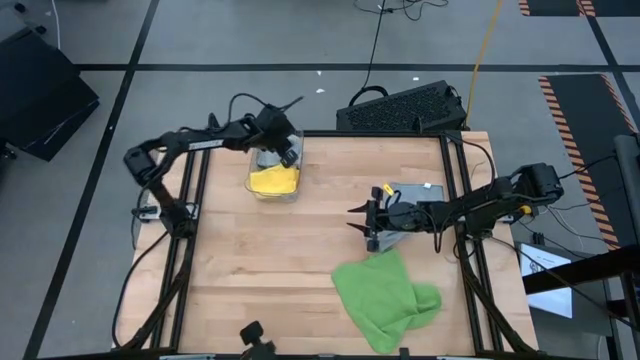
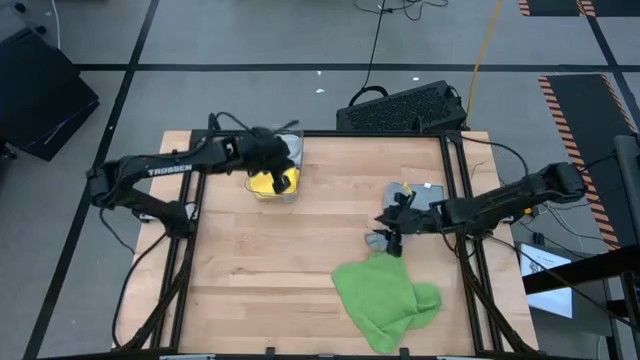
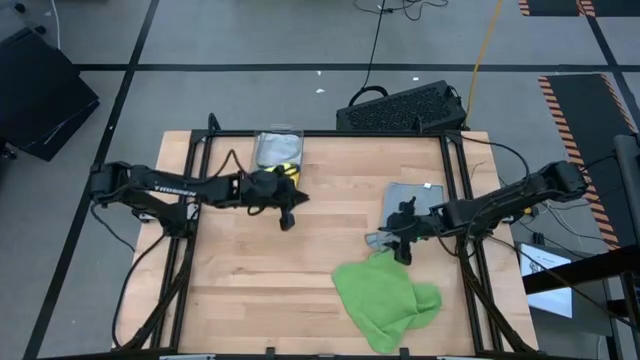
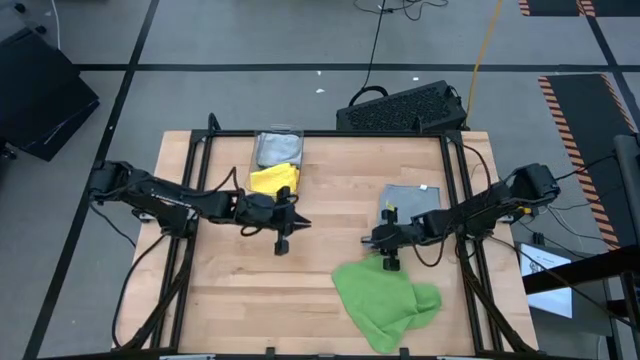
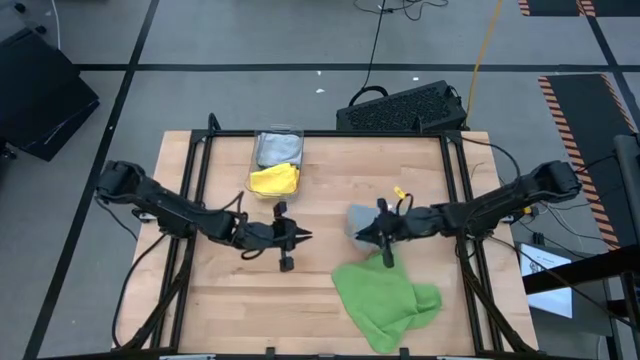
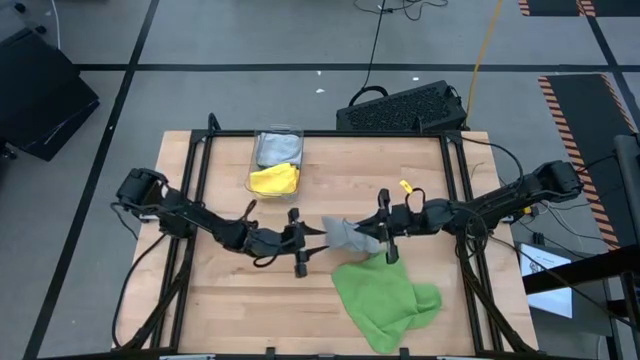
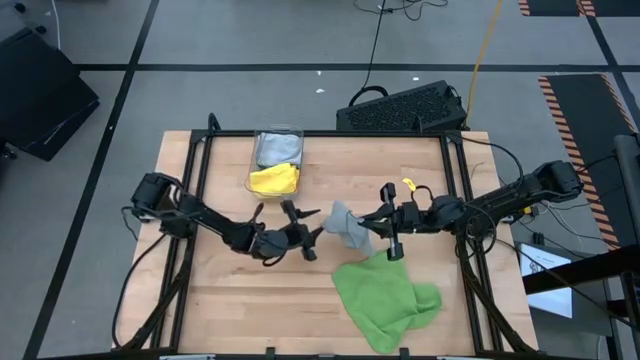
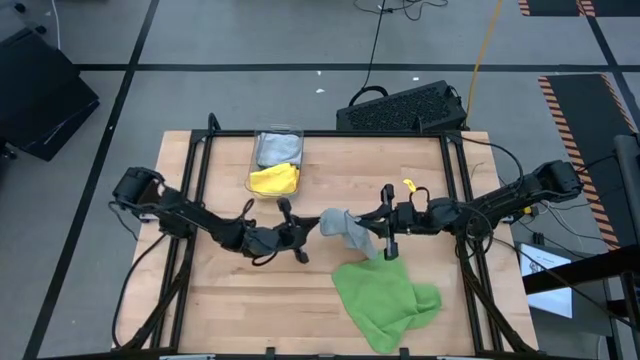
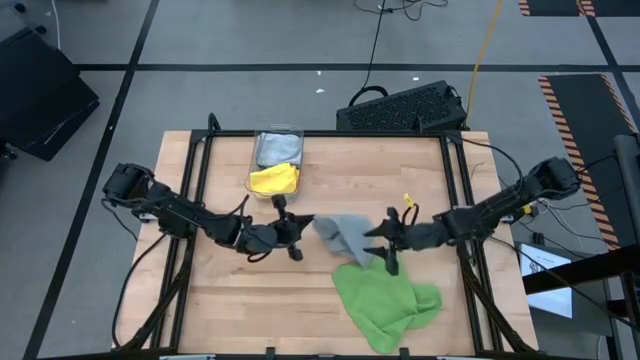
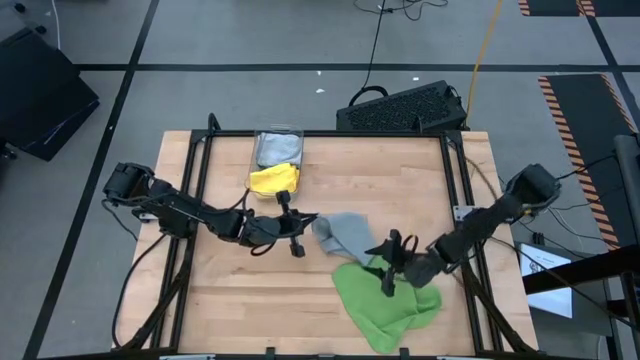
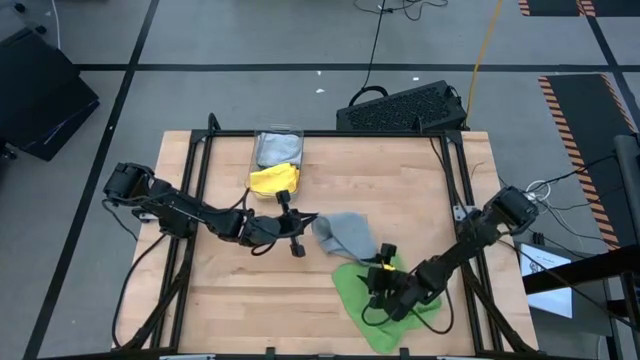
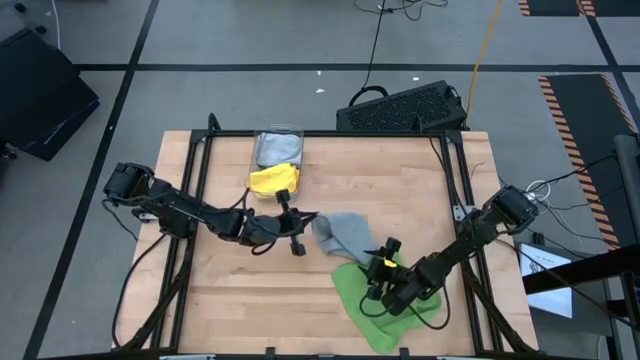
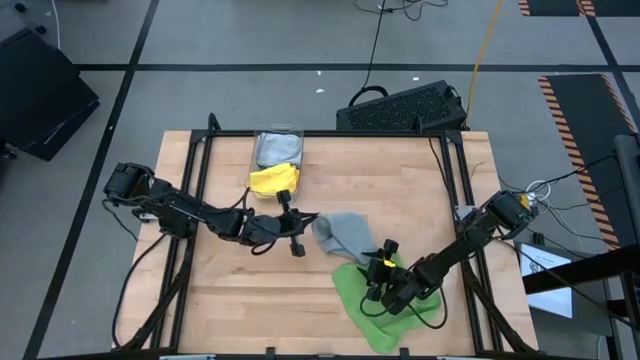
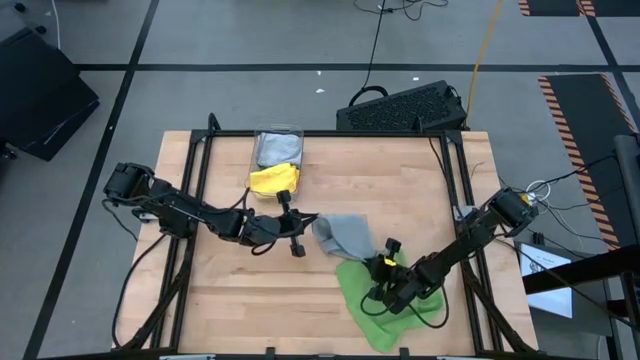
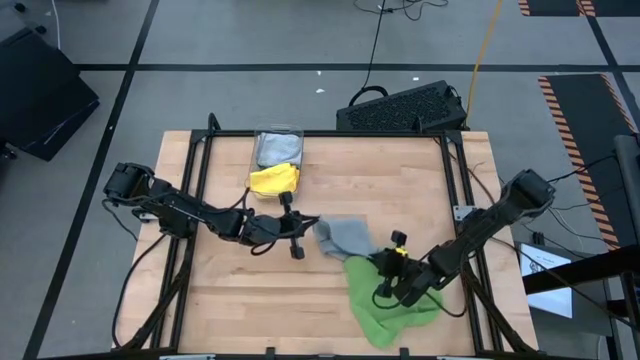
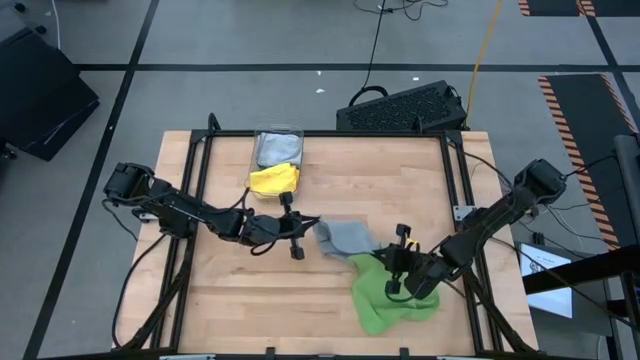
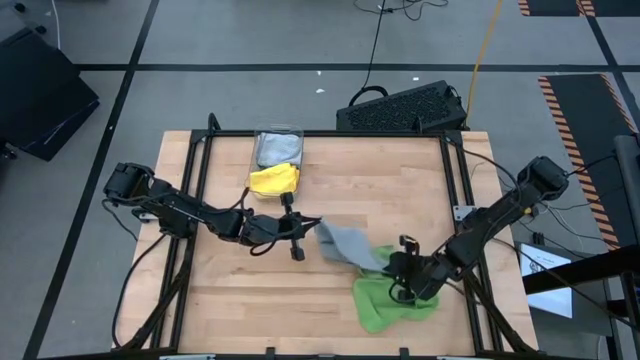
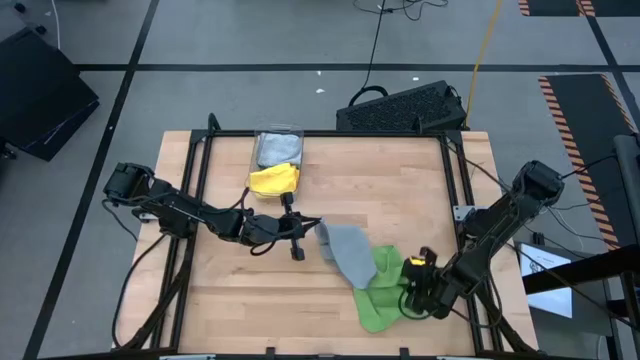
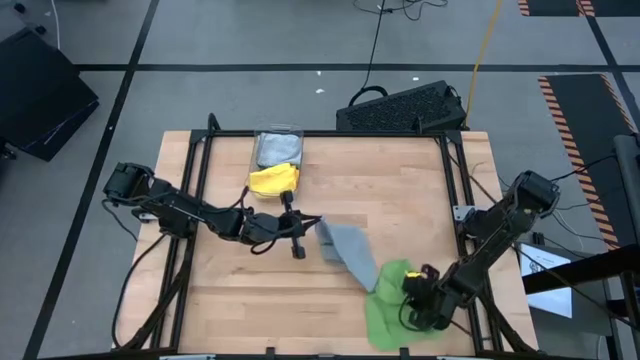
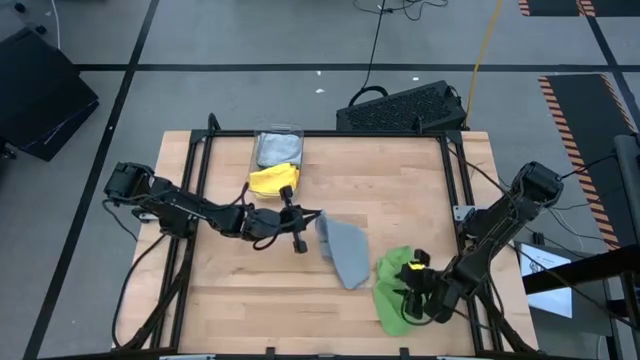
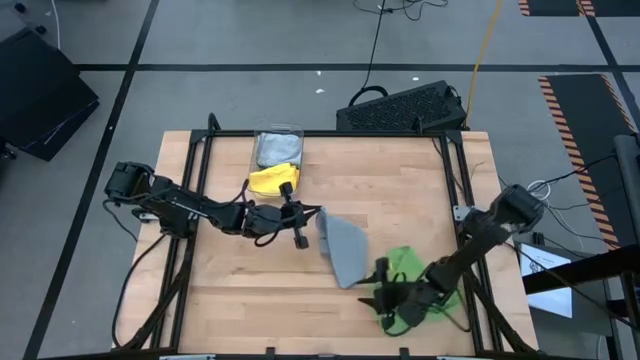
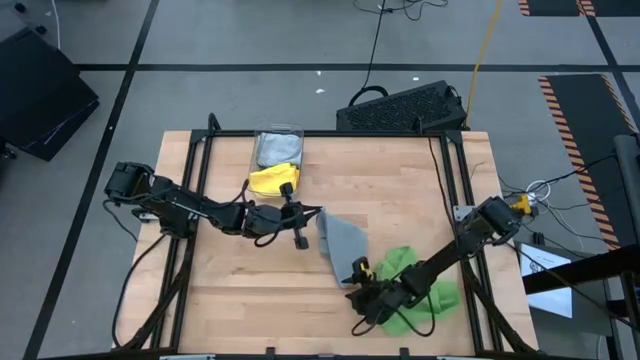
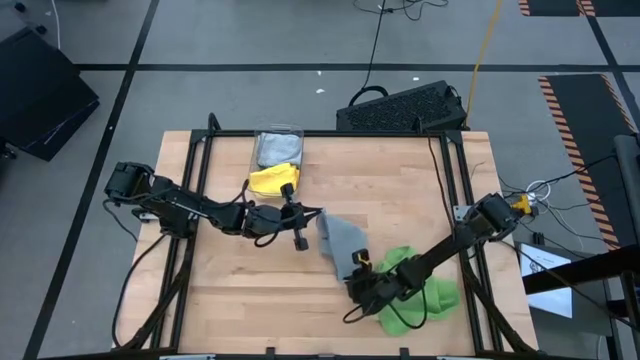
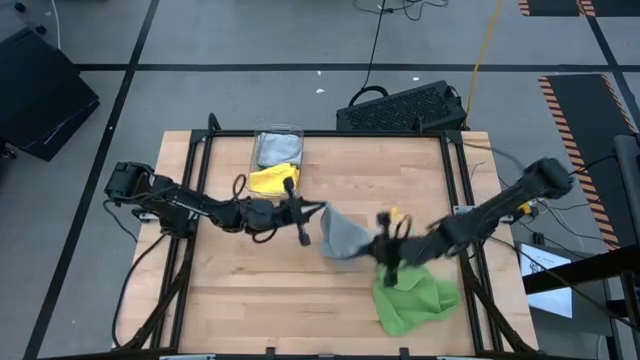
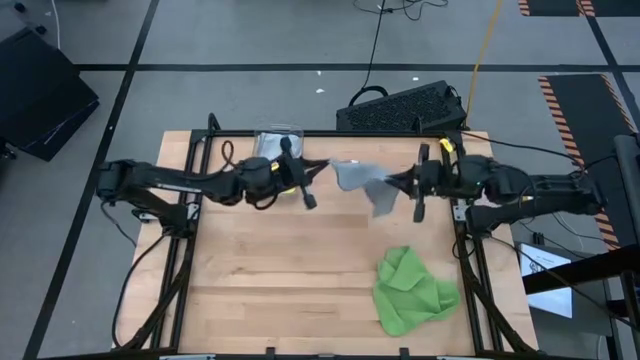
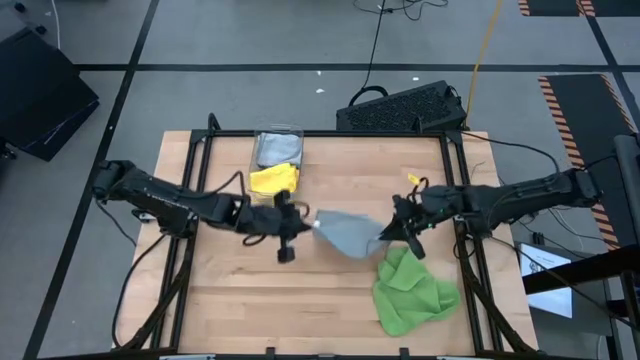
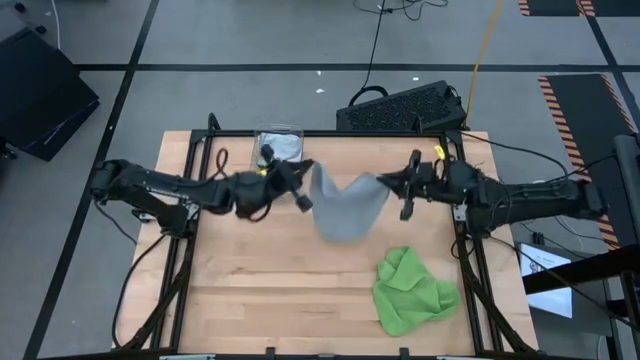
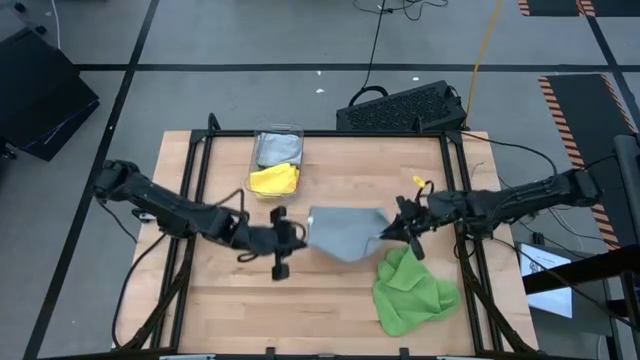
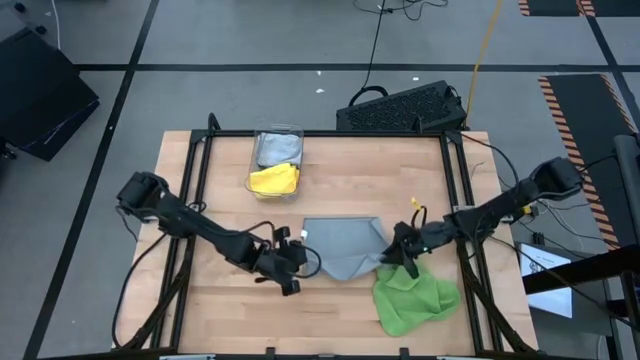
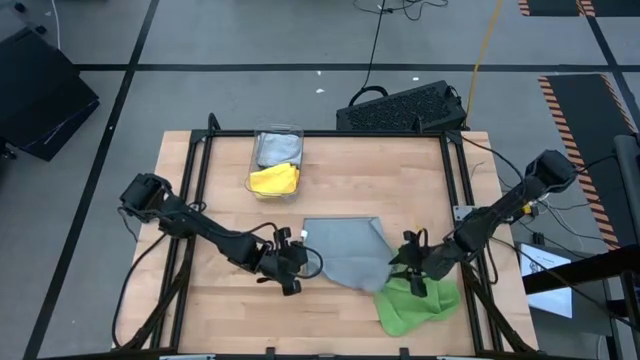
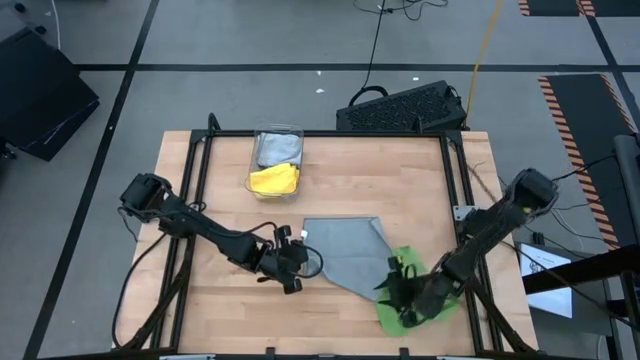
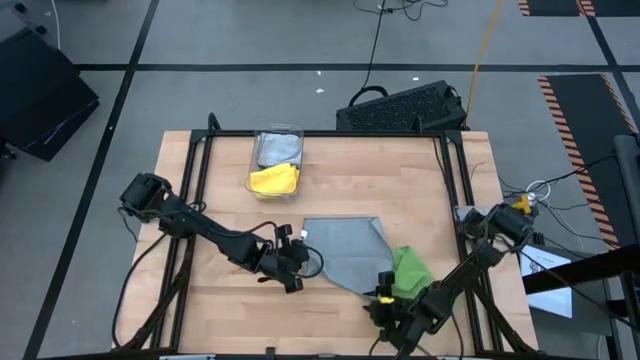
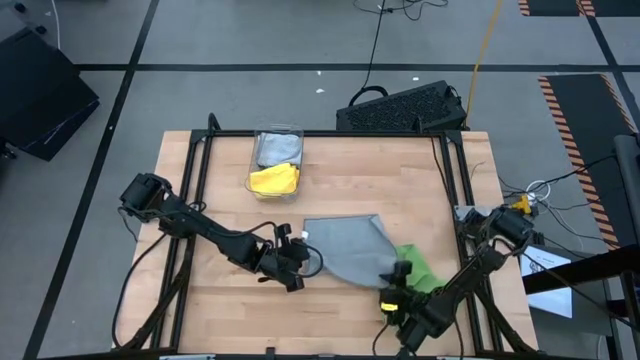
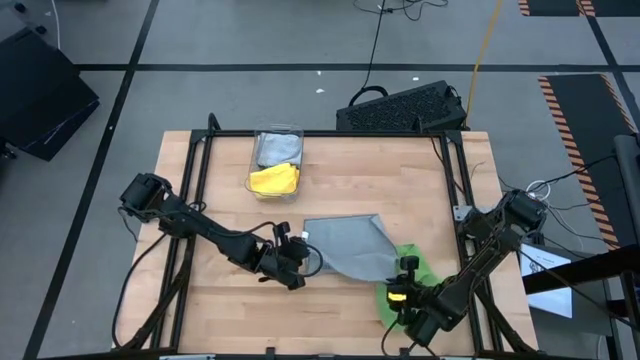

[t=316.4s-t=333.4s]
Task: Fold microfiber towels
Fold the gray towel on the table

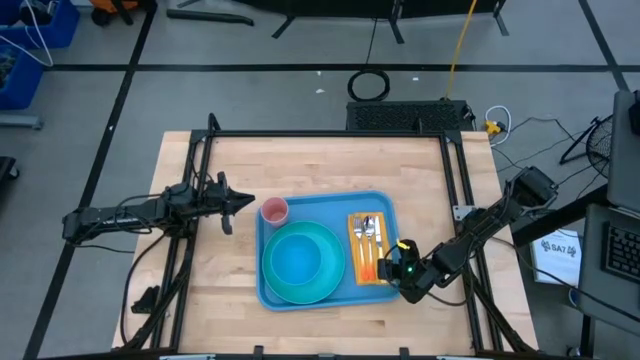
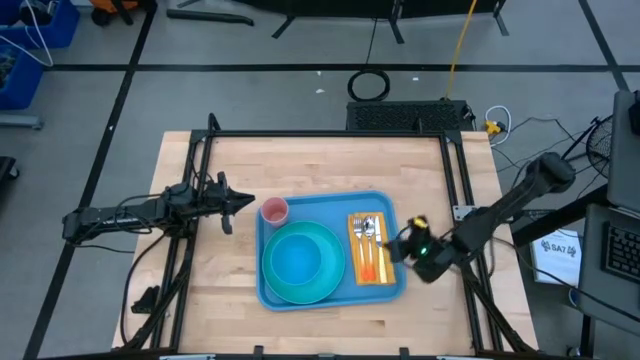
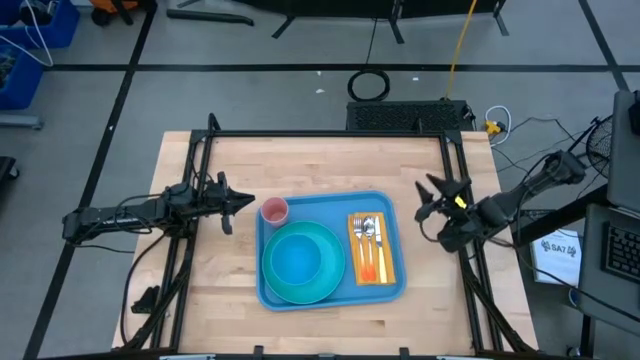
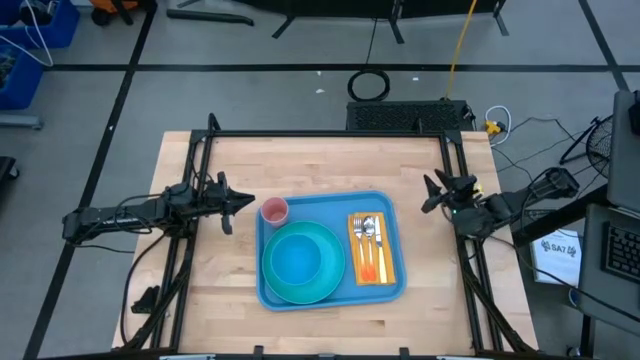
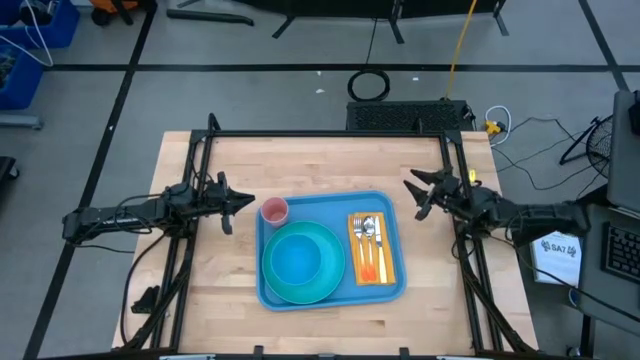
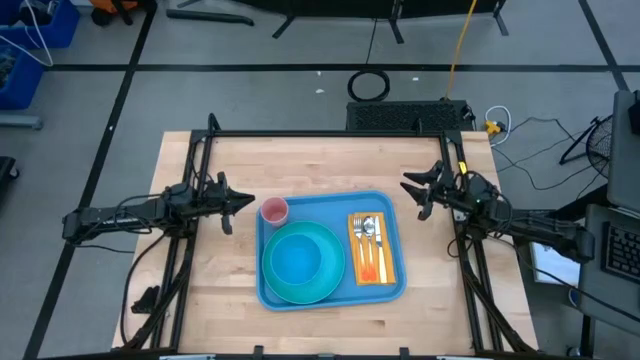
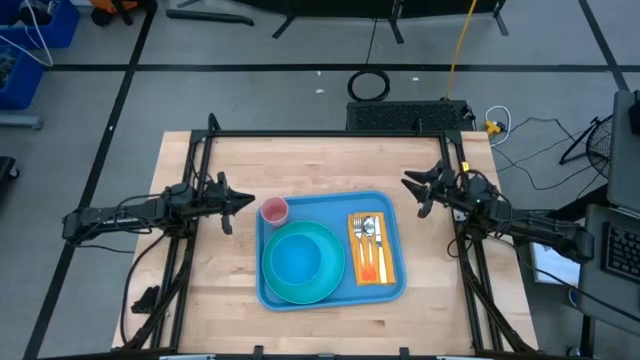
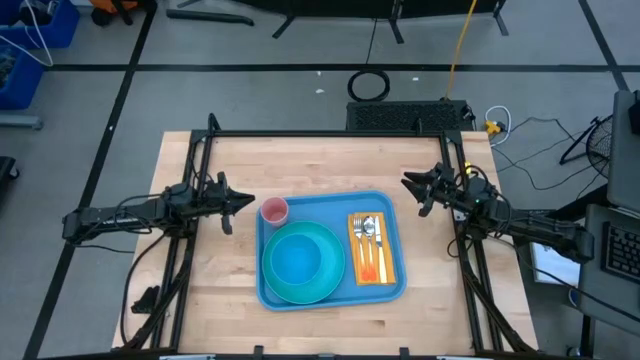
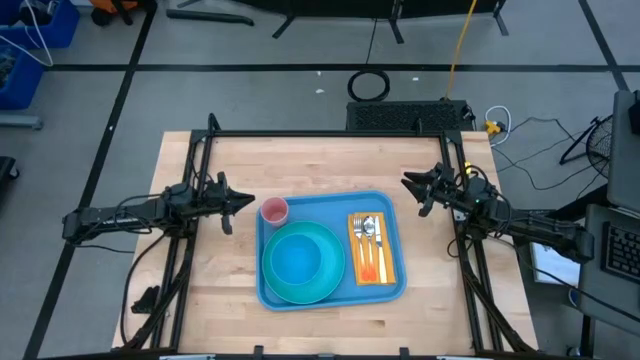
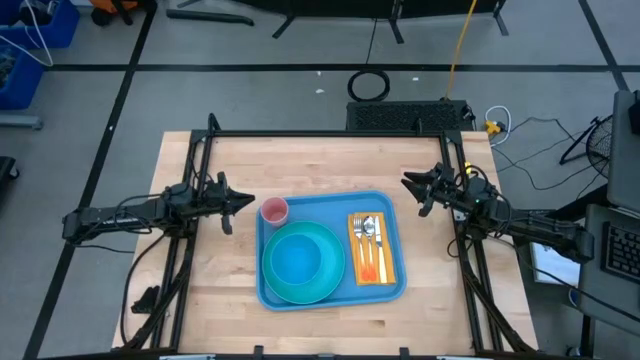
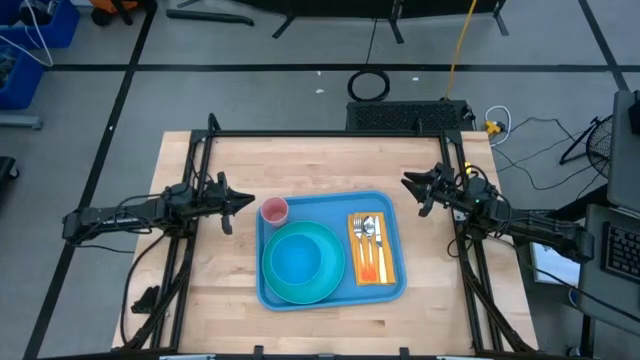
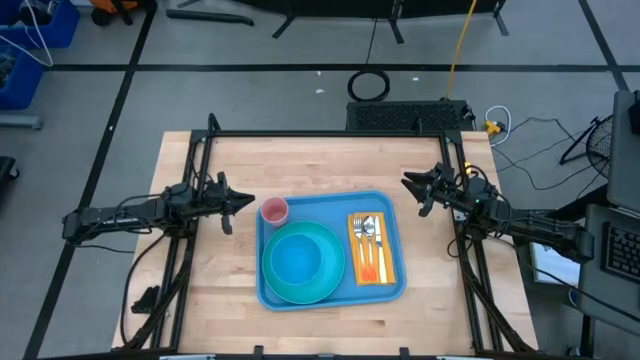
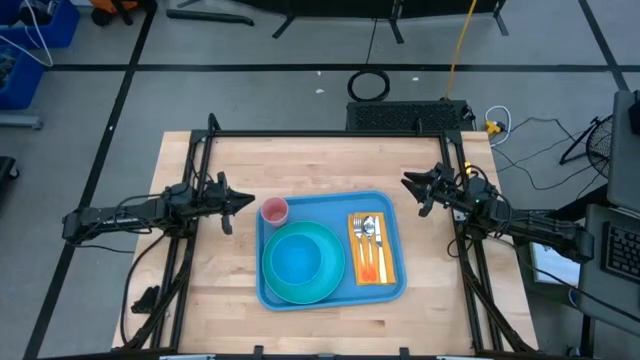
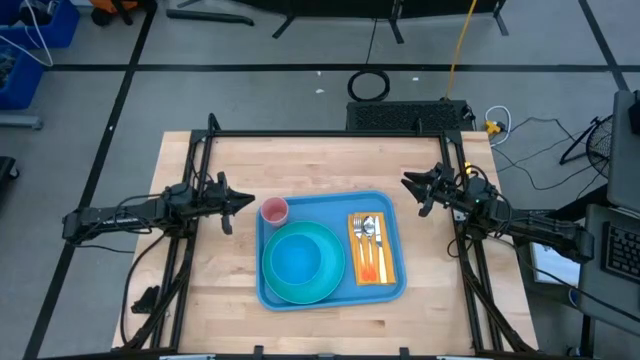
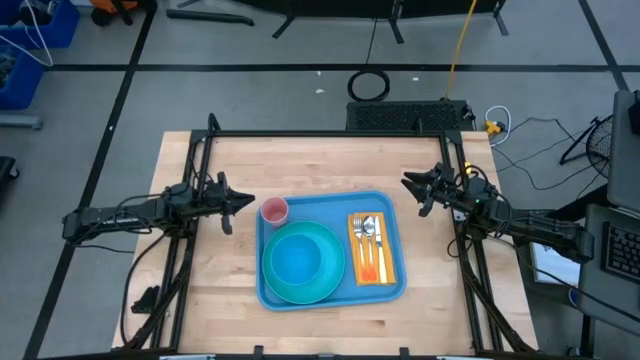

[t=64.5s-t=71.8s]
Task: Set up tray
Return to Home Position
